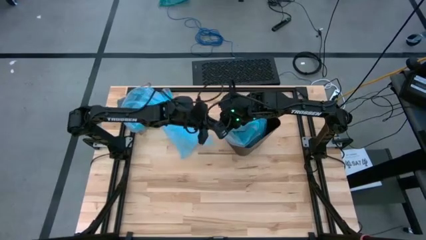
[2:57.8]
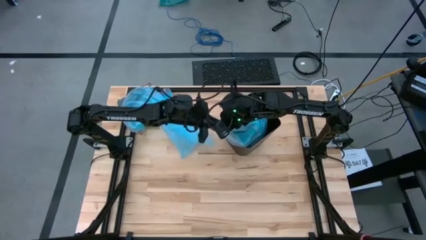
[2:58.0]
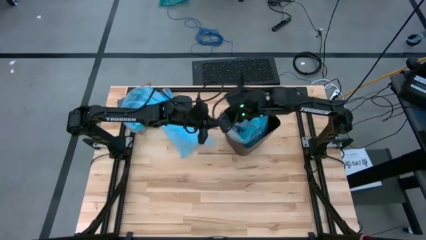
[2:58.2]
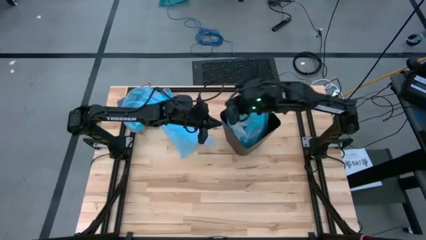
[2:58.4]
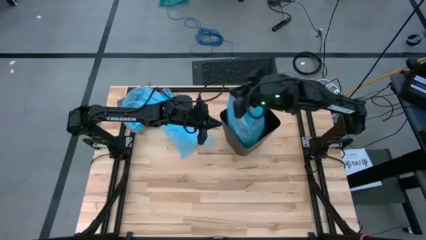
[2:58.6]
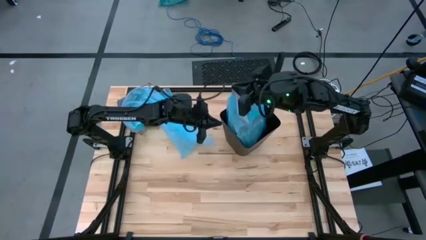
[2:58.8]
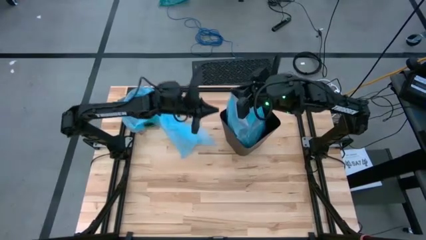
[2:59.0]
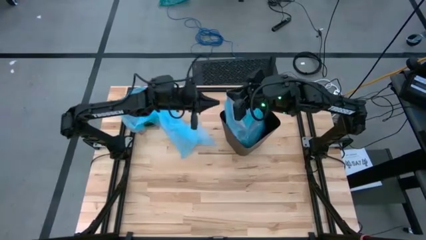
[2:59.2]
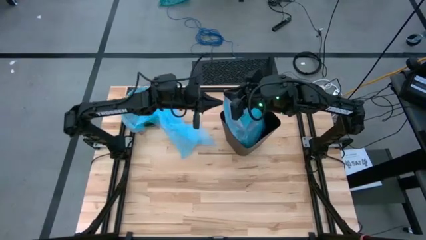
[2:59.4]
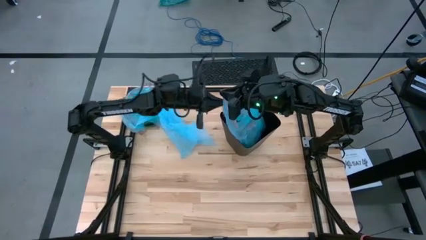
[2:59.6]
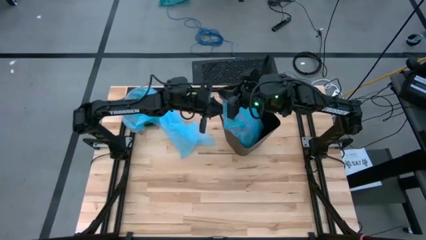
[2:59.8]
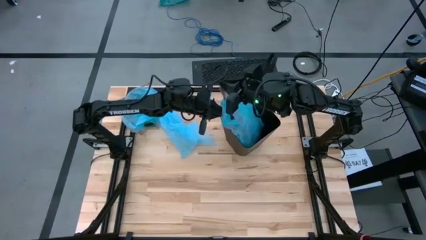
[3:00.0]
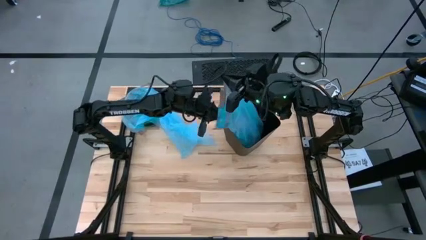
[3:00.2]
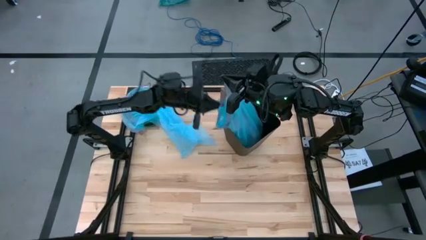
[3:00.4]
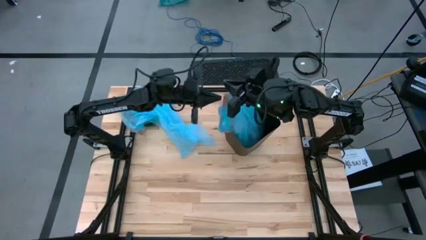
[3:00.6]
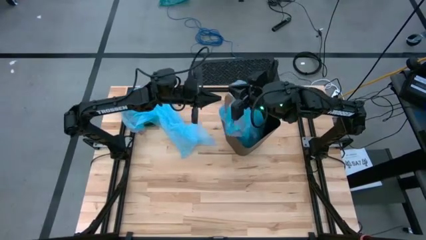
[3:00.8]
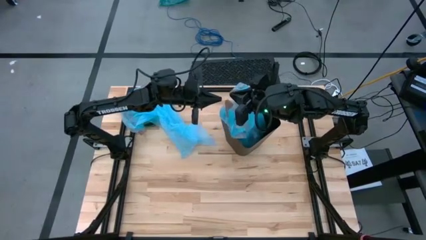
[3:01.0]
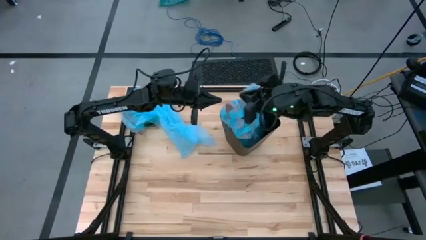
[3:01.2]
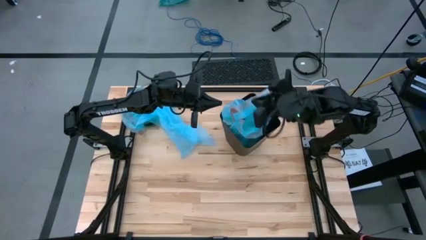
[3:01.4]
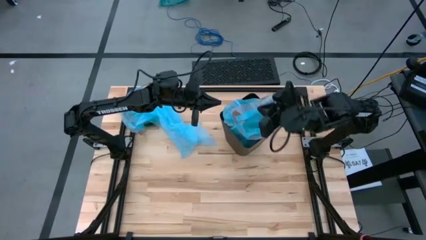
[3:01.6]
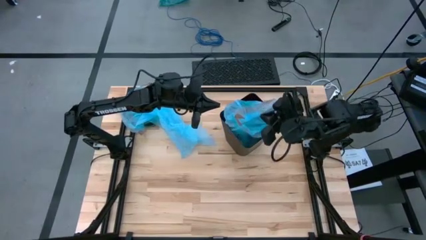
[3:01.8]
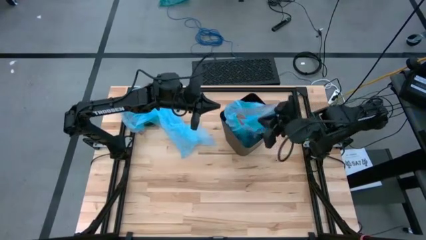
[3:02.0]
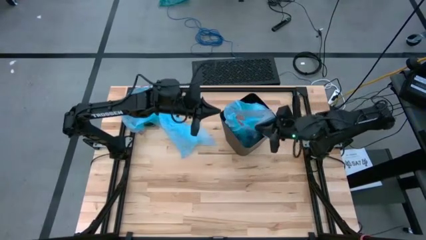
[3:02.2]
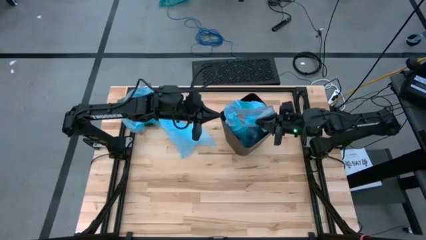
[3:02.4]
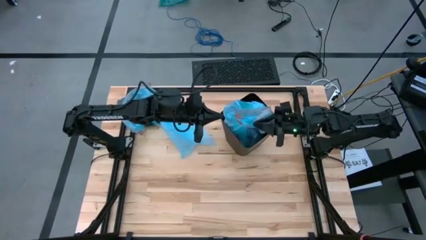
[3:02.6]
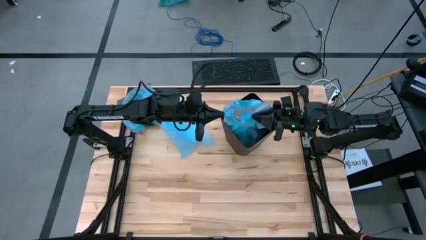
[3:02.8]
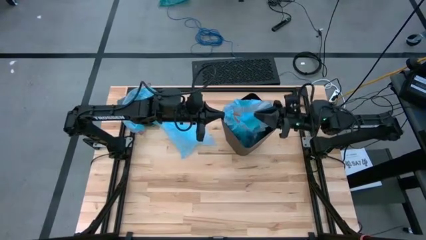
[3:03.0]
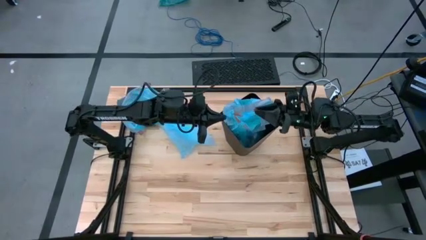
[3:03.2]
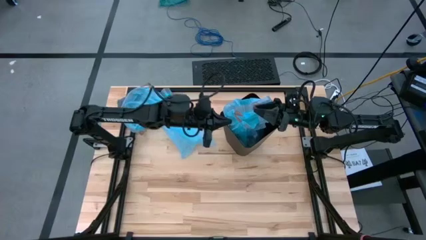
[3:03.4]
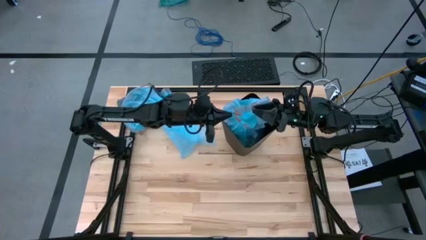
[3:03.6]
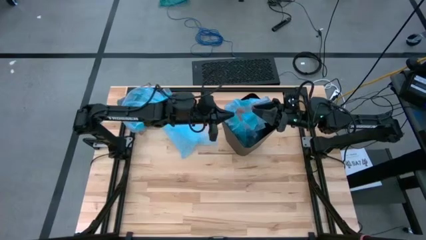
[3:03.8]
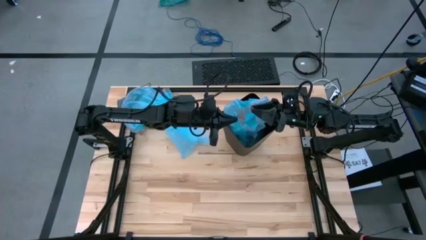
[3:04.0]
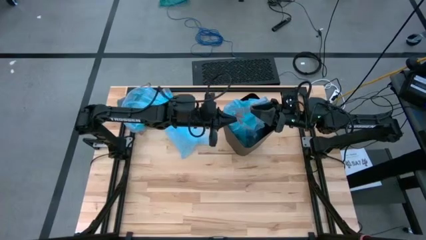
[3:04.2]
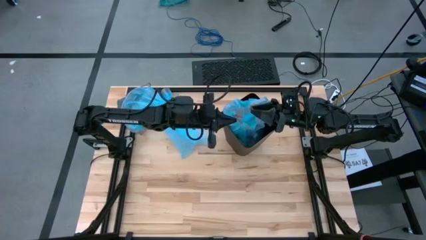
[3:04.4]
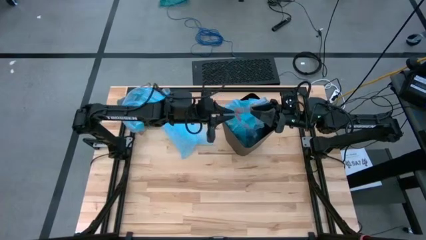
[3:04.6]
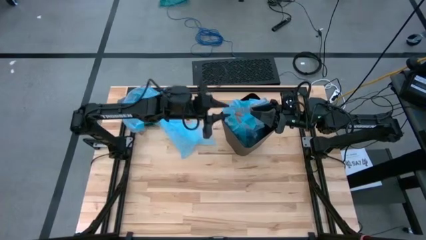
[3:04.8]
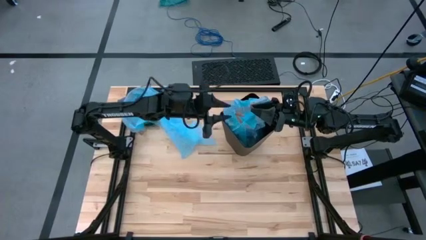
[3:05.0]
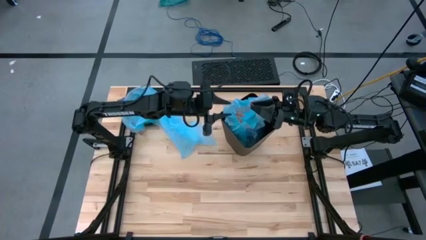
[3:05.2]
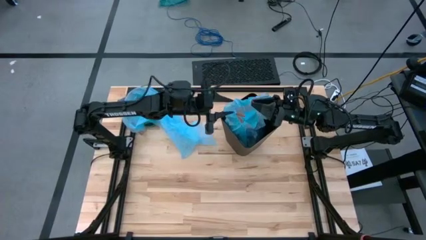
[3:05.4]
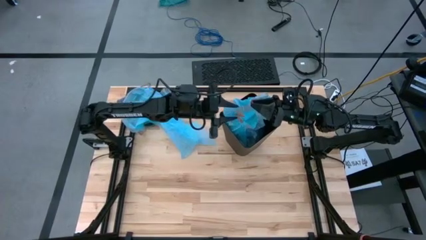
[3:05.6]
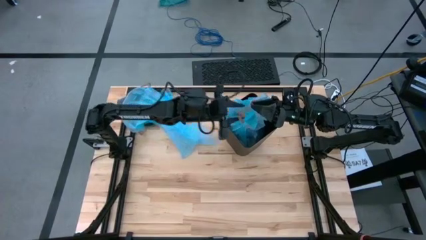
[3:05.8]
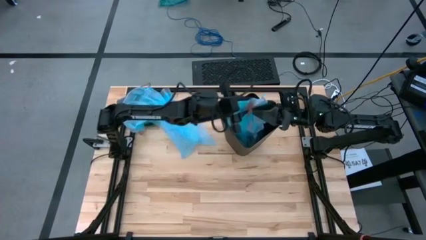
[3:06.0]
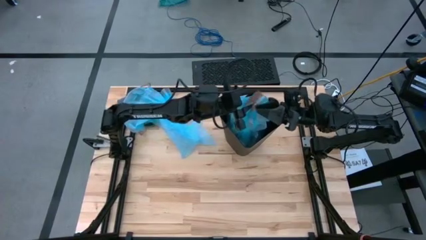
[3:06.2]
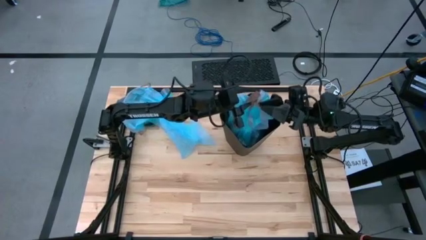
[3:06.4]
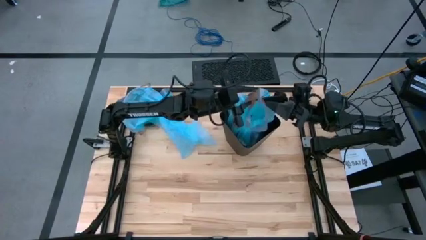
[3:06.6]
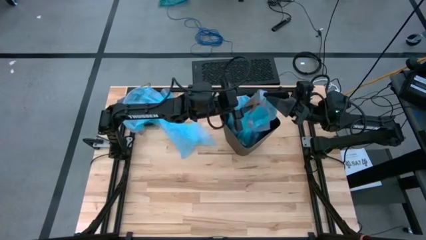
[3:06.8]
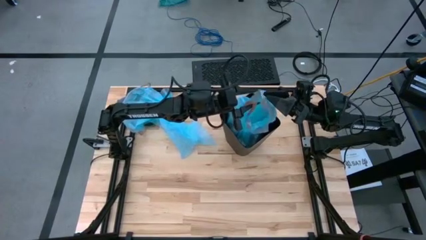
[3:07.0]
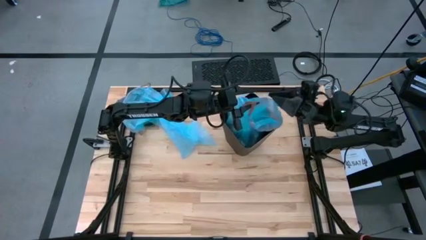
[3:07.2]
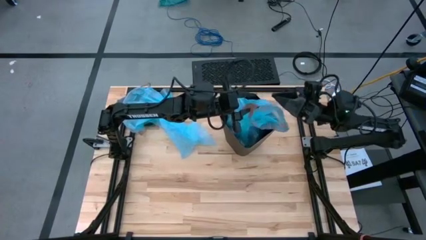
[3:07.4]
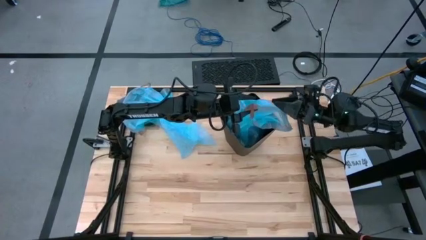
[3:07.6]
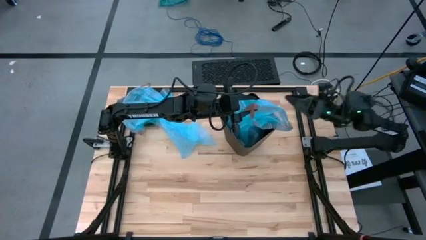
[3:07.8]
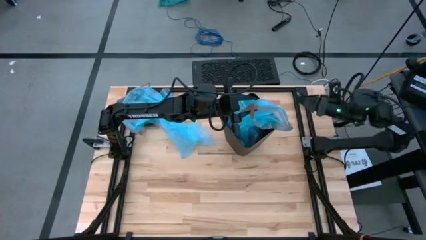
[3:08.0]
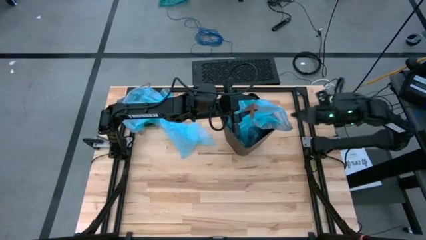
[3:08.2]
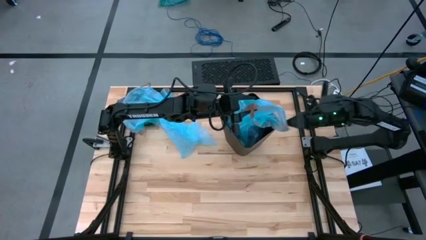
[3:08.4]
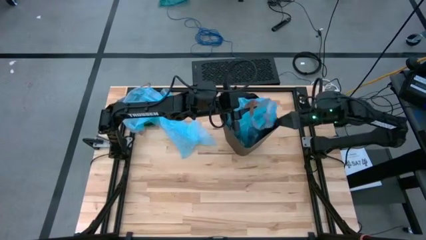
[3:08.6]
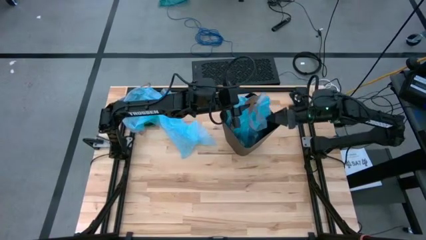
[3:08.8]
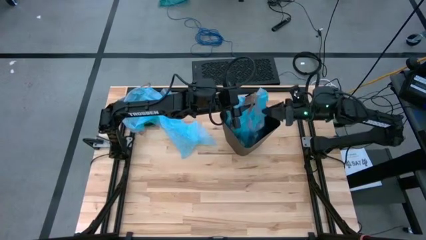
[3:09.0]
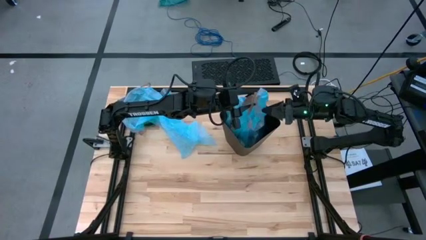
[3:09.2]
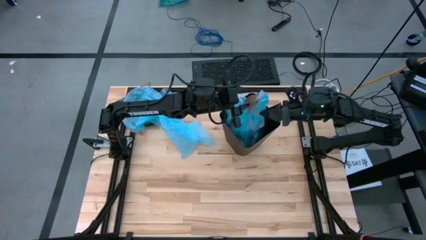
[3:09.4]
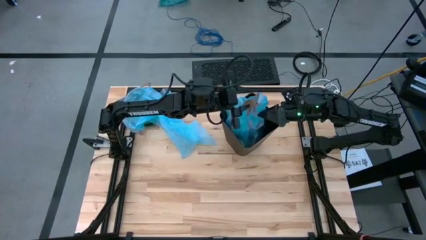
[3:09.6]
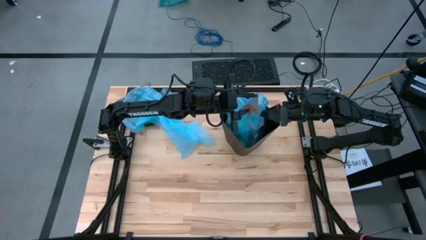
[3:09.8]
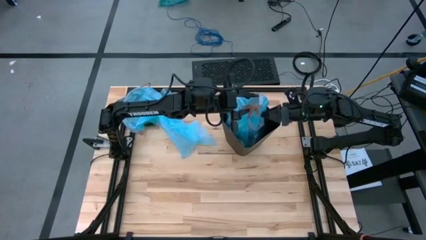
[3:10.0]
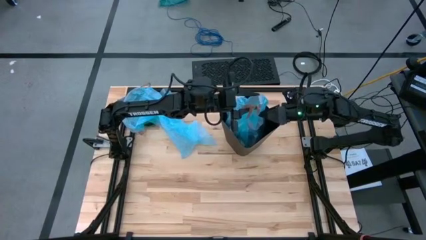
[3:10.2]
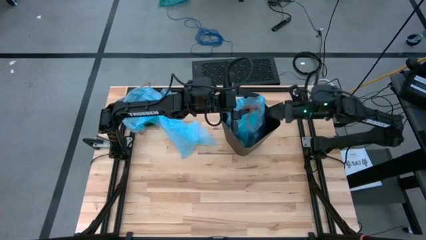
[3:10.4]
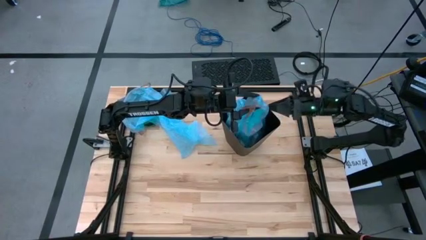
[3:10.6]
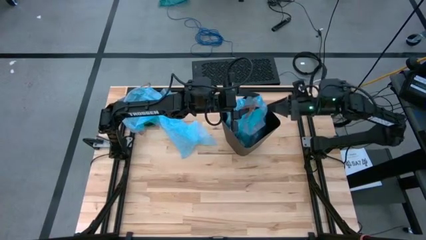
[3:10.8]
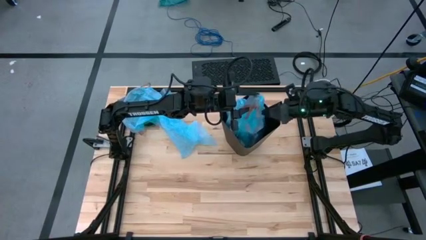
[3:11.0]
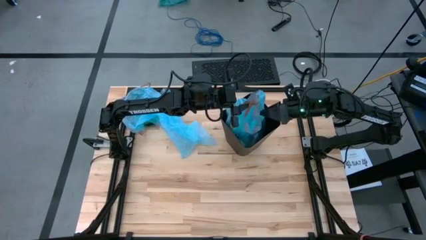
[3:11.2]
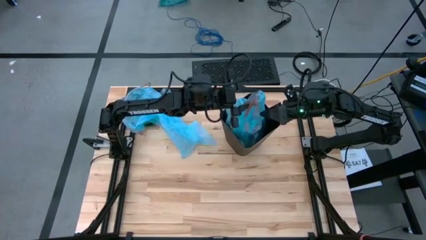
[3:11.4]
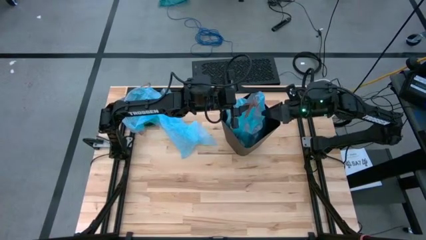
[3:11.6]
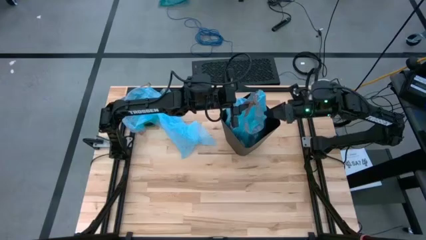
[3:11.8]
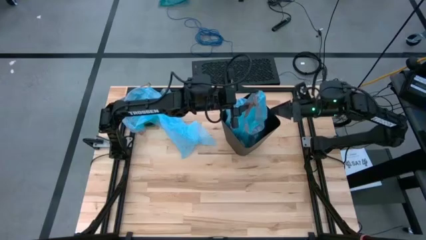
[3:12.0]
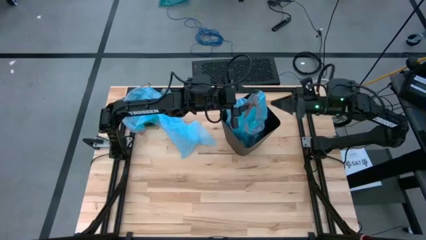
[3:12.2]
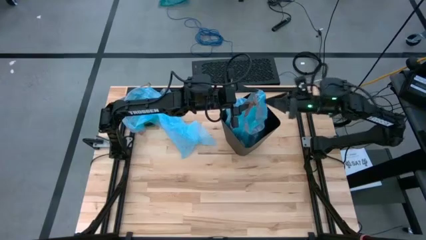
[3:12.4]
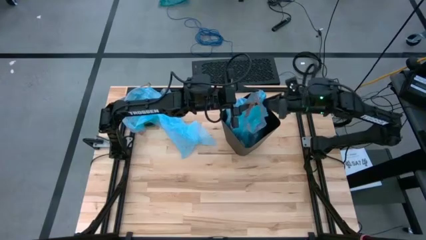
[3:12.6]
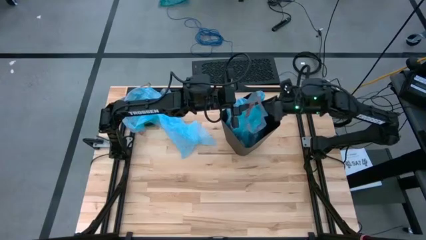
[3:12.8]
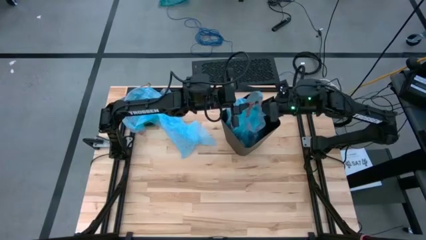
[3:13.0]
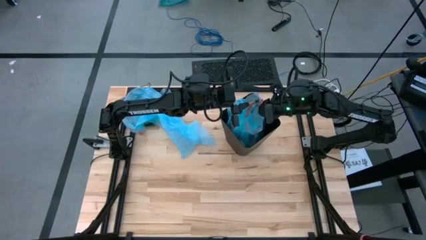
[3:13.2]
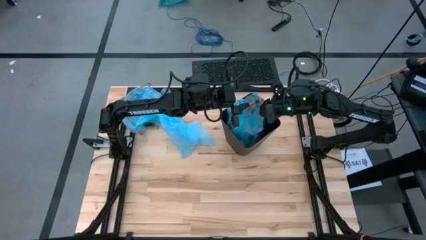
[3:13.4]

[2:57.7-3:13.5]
Task: place trash/remove bag and relplace
Remove the blue trash bag from the trash bin
